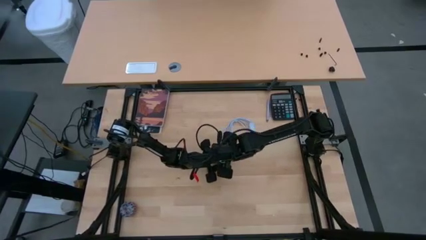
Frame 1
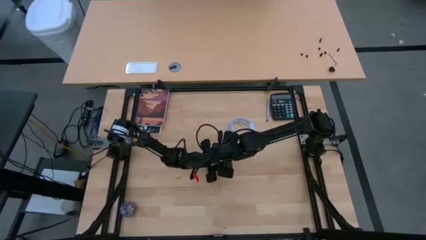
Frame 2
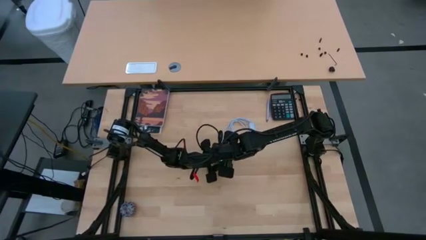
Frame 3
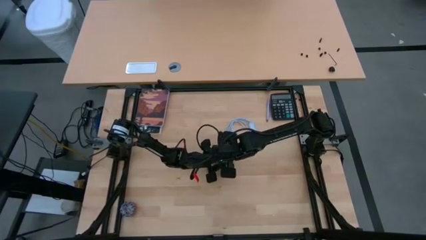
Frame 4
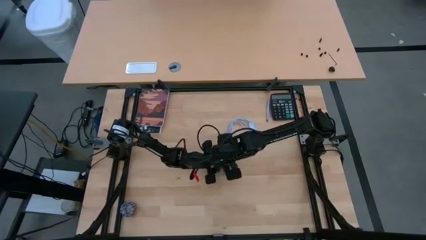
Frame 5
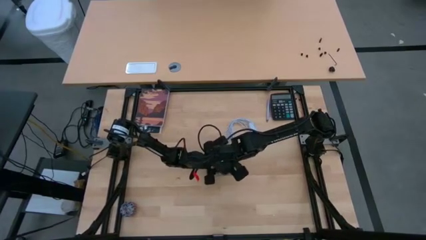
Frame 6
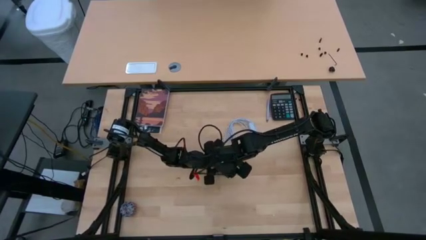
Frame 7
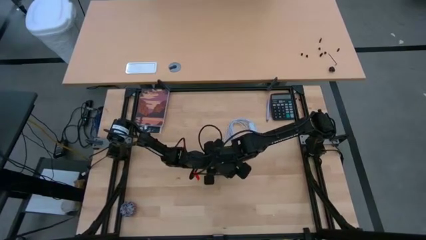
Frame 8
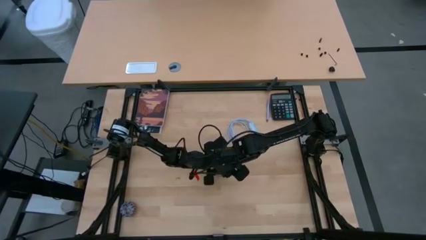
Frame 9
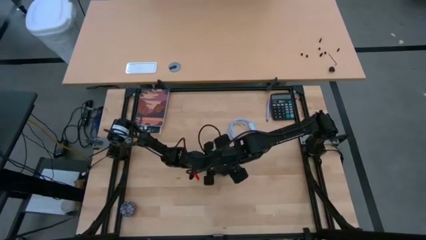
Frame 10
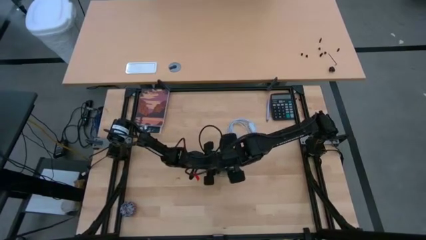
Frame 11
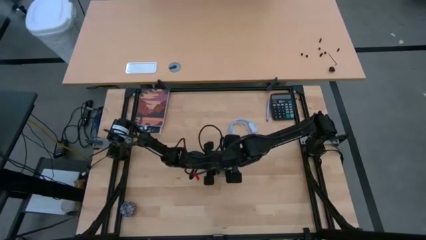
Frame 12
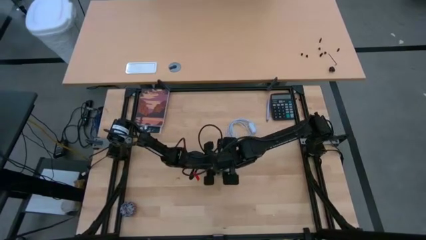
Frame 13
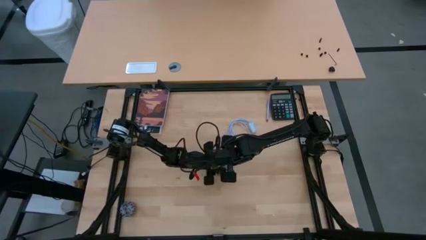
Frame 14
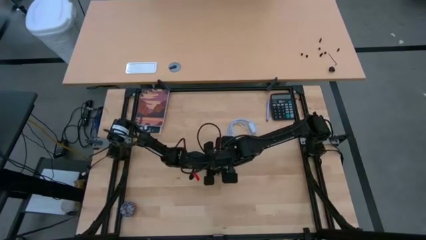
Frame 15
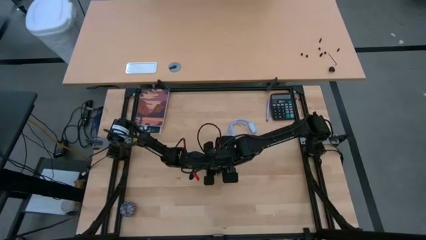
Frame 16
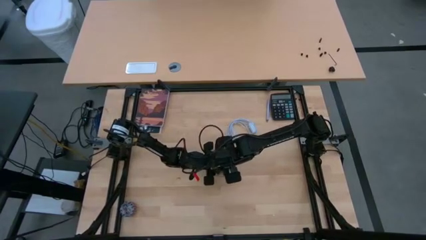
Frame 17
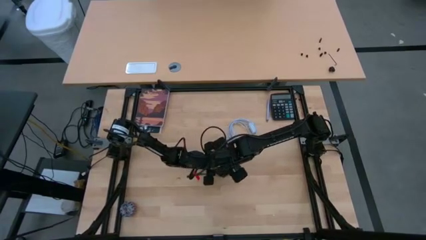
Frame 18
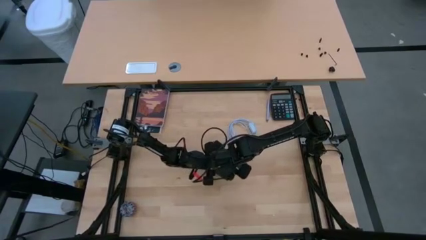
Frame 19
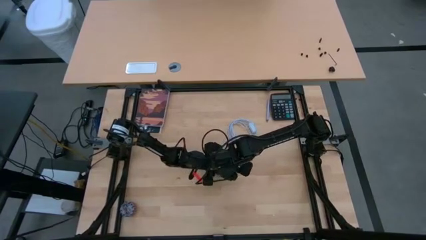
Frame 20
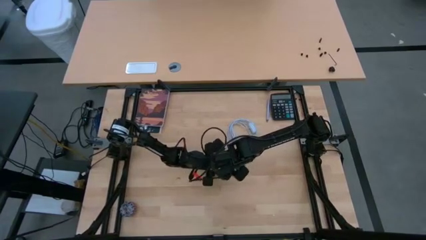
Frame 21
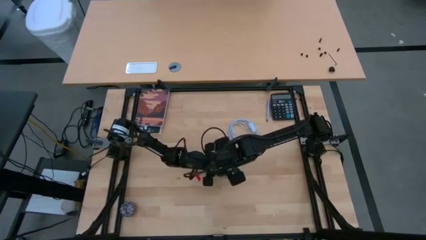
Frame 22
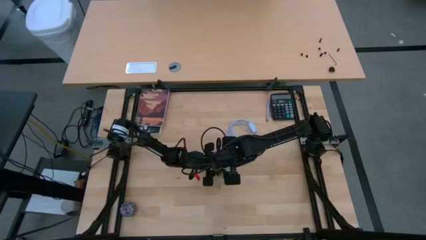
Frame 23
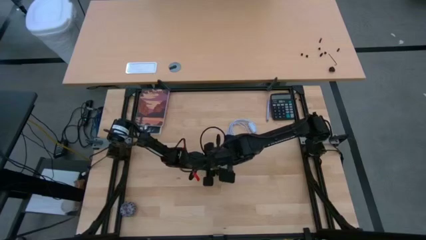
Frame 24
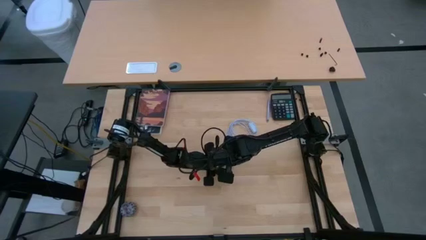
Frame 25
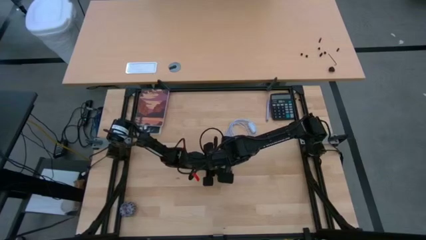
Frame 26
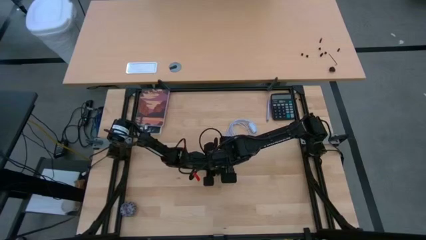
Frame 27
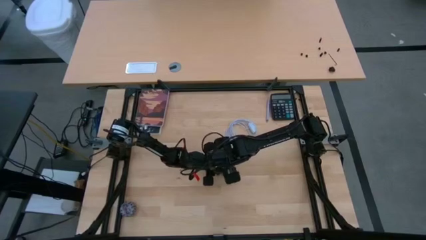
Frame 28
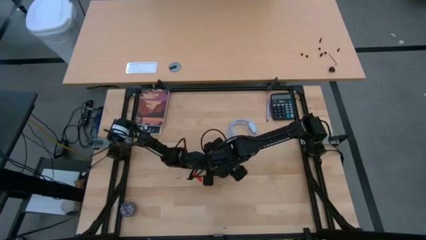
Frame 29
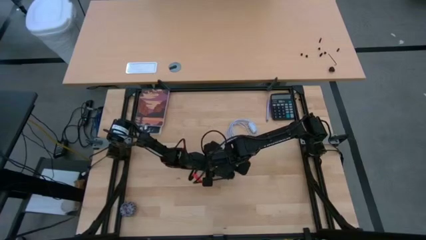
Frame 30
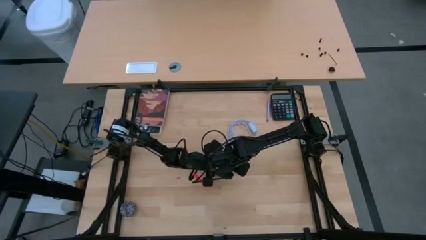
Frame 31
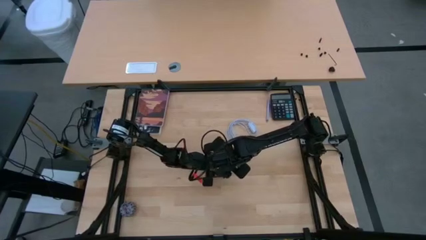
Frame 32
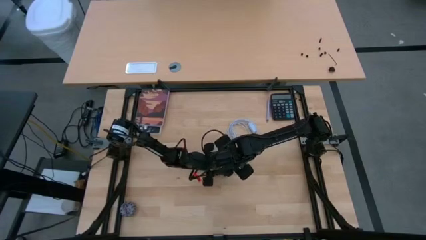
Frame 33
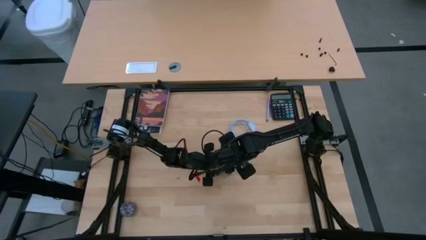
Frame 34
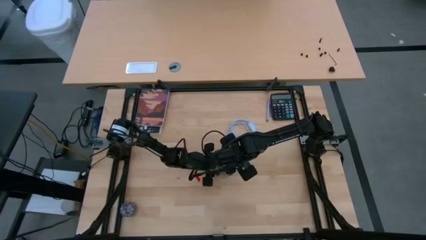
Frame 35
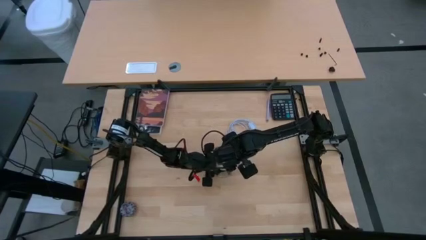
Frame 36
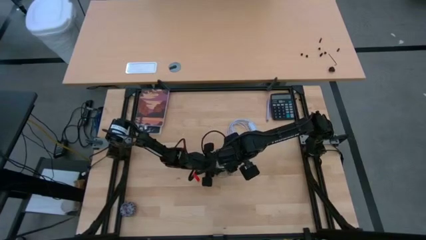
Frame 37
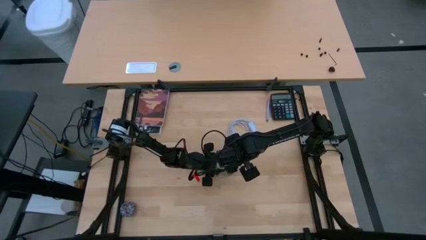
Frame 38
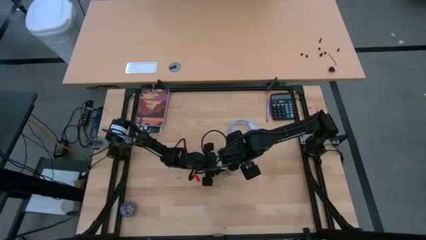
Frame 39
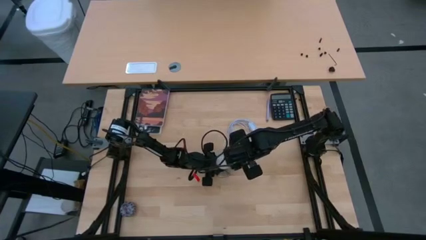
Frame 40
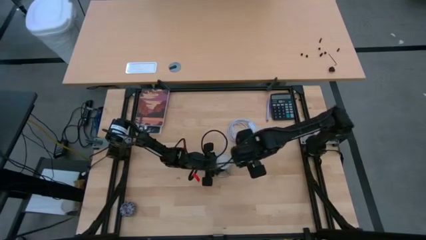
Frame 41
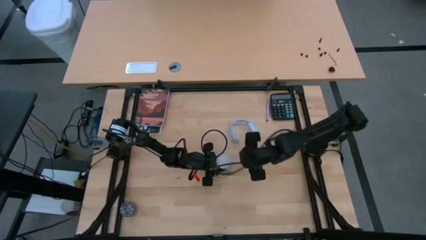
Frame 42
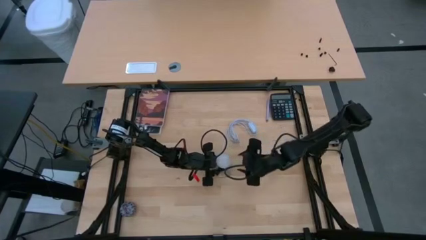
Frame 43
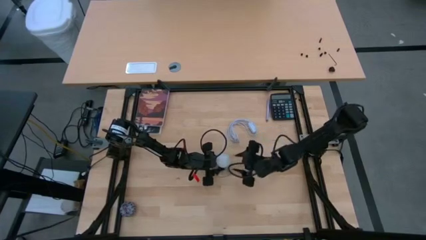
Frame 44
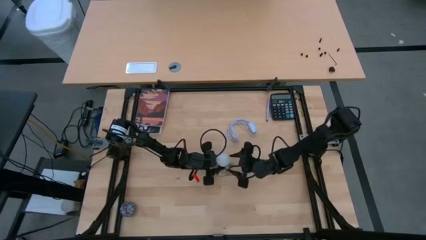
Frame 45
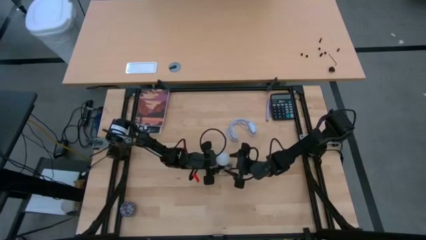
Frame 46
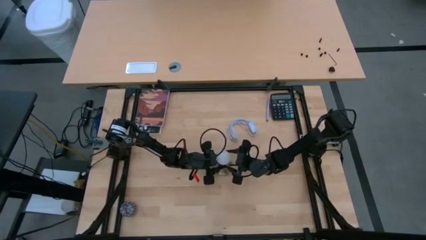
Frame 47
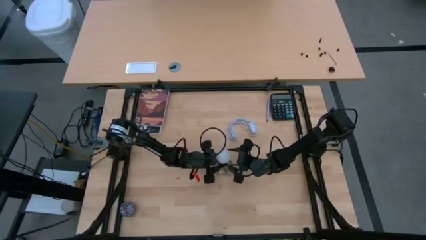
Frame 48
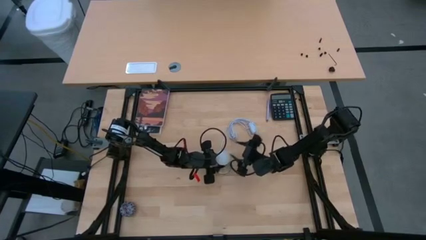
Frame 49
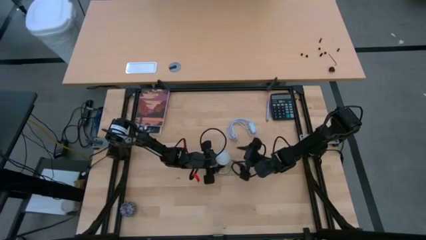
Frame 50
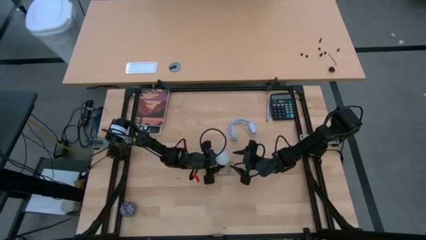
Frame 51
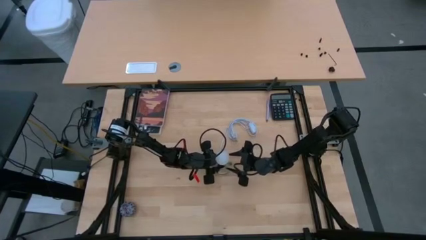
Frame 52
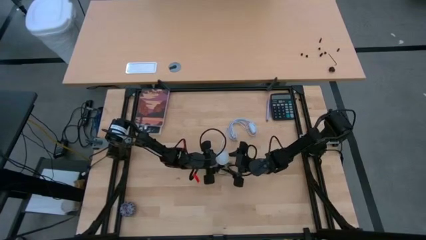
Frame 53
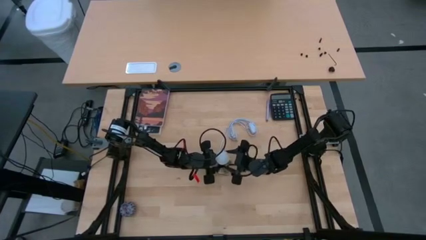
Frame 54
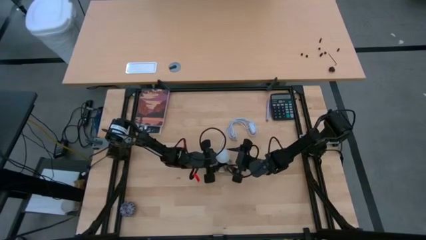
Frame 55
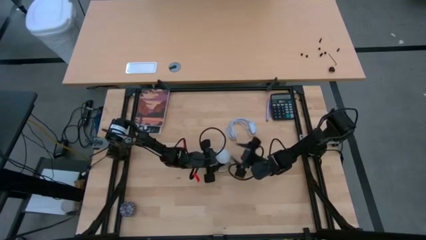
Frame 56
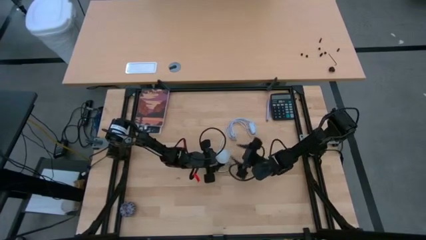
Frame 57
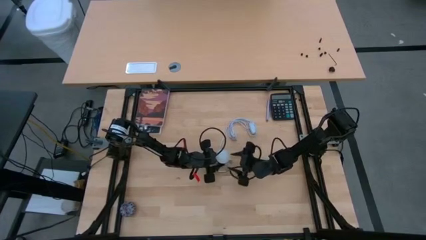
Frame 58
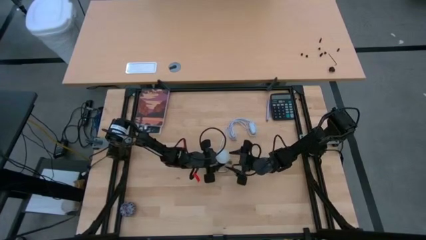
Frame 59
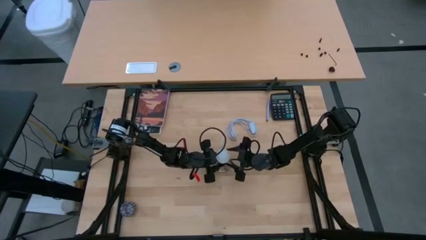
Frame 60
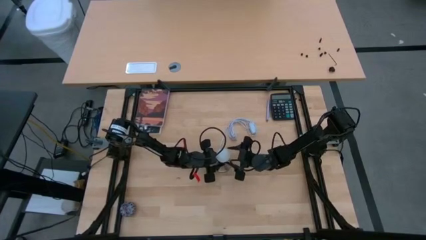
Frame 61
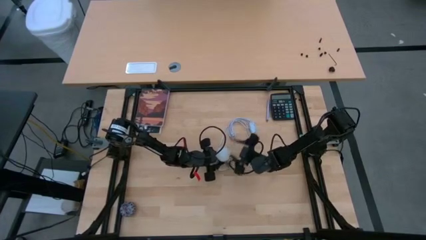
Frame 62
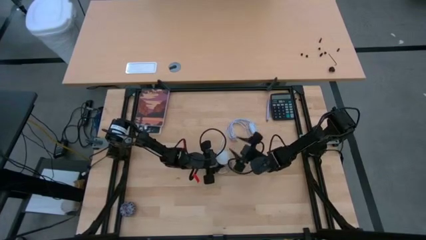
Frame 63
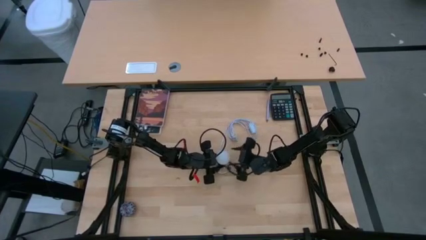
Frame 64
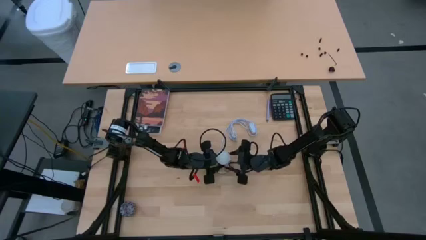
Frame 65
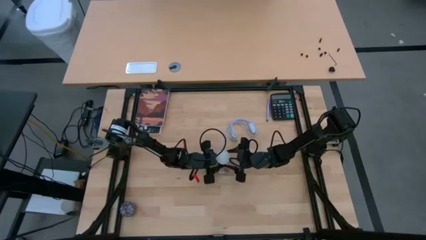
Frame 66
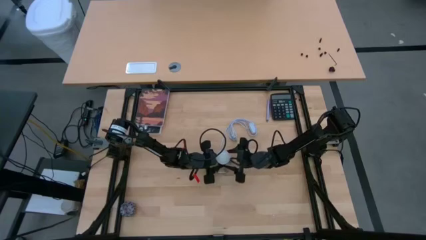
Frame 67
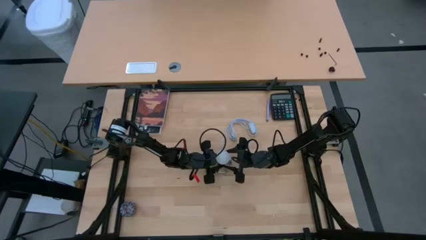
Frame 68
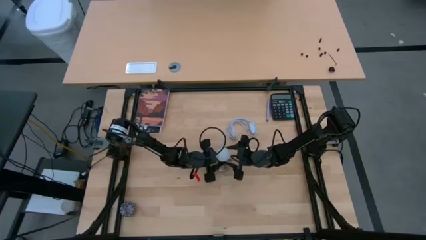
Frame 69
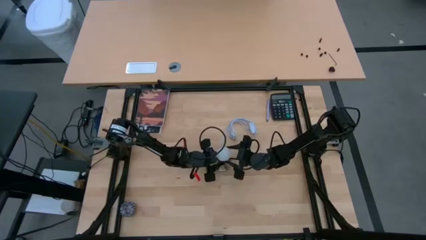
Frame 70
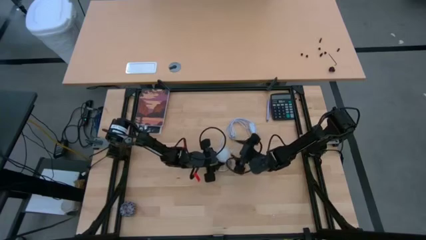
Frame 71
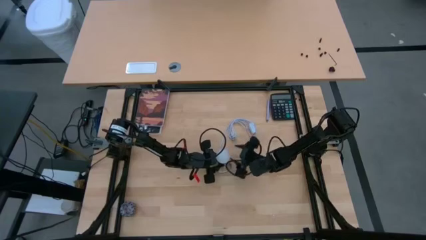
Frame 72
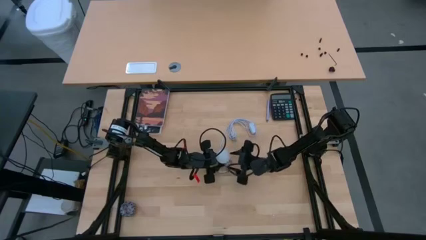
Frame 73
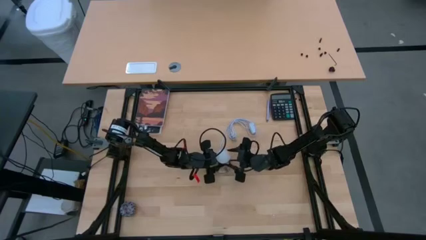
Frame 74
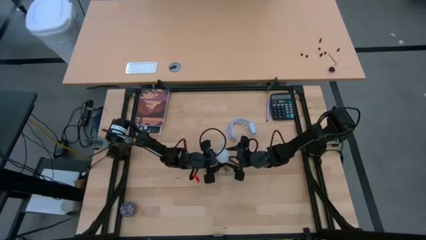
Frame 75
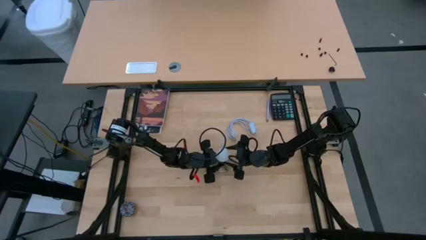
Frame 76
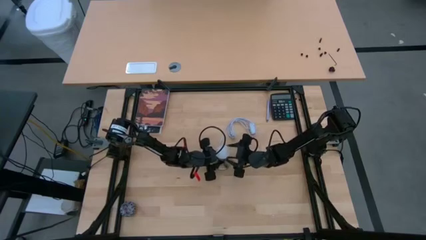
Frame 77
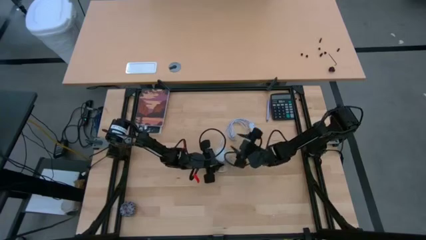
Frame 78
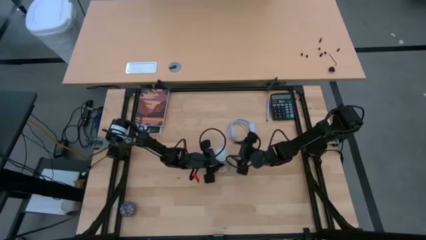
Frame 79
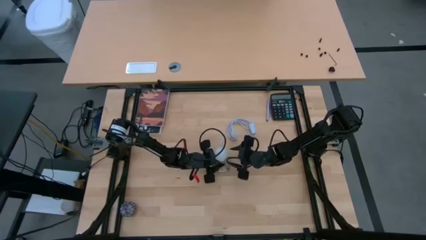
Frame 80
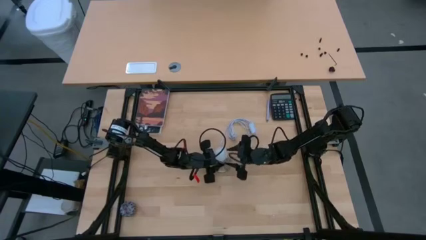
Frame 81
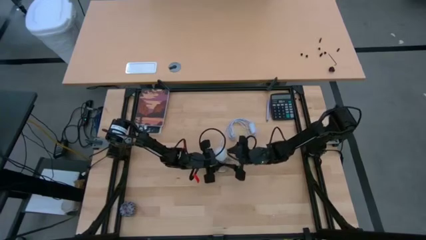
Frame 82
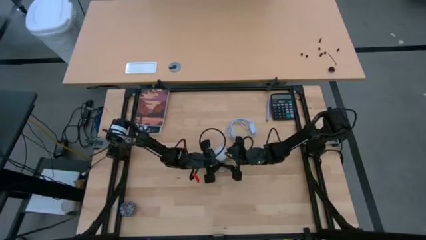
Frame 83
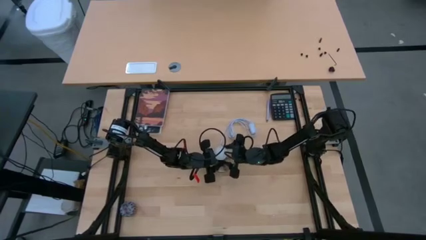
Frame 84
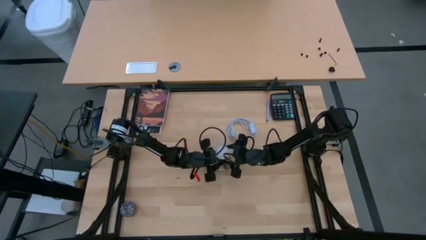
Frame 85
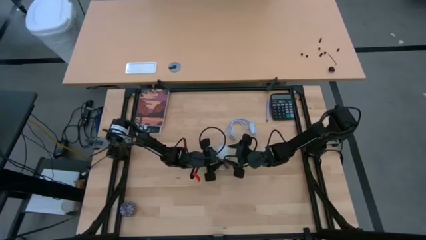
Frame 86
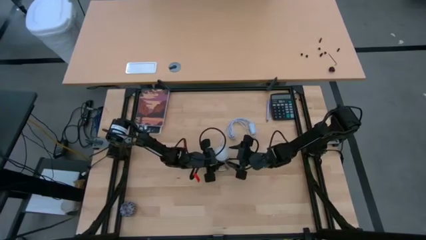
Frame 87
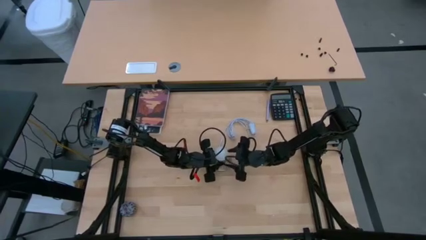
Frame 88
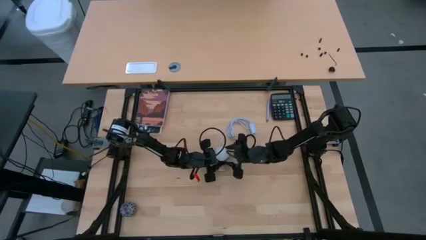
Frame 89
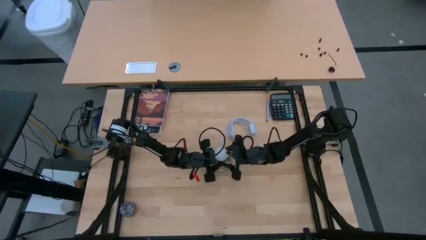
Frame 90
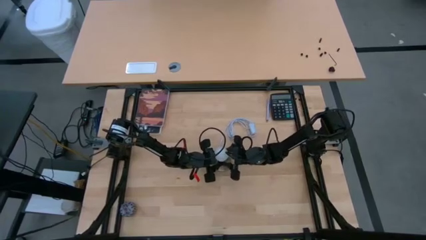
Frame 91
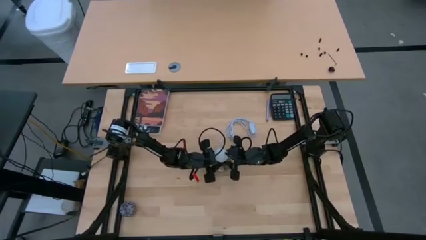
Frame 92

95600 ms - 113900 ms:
Task: Screw lightbulb
Remove the lightbulb from the lamp
